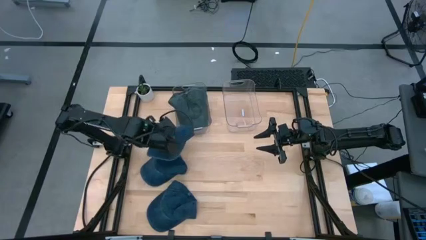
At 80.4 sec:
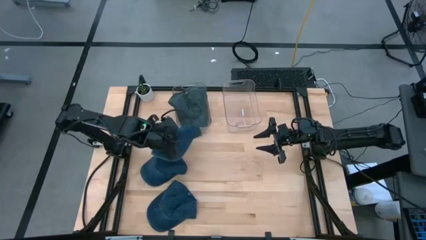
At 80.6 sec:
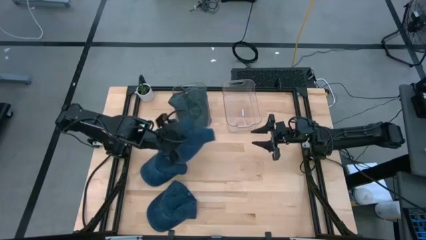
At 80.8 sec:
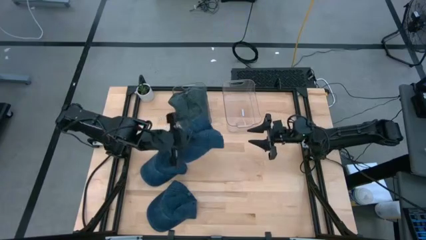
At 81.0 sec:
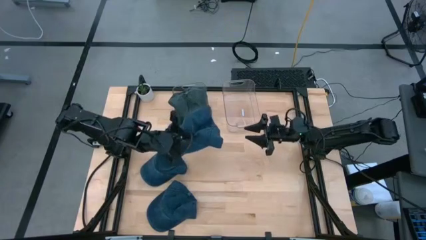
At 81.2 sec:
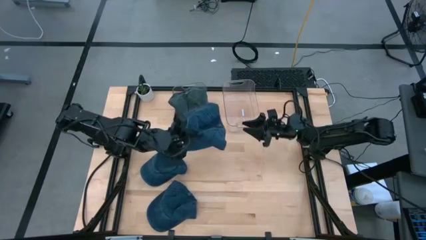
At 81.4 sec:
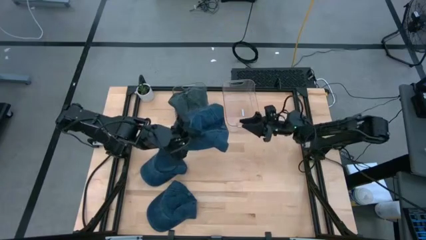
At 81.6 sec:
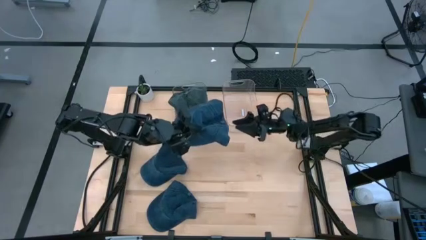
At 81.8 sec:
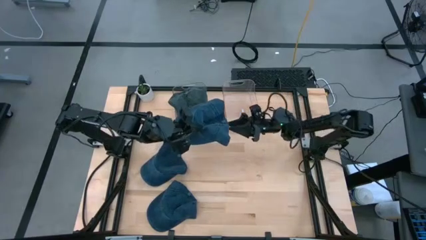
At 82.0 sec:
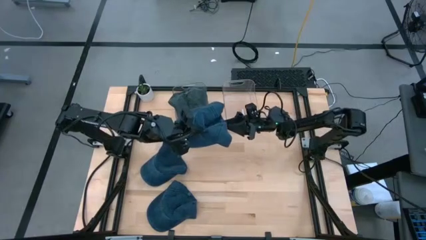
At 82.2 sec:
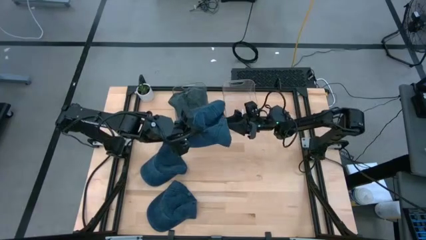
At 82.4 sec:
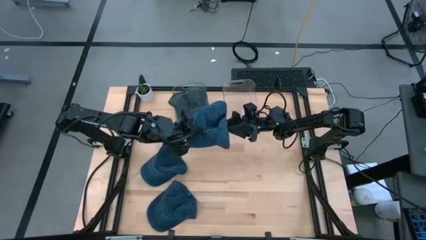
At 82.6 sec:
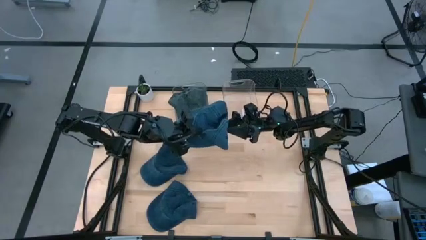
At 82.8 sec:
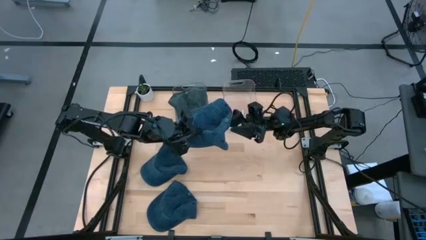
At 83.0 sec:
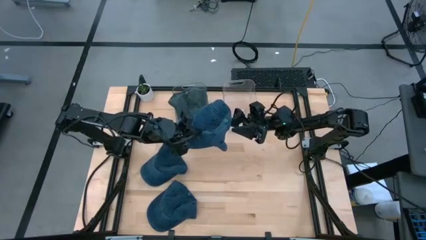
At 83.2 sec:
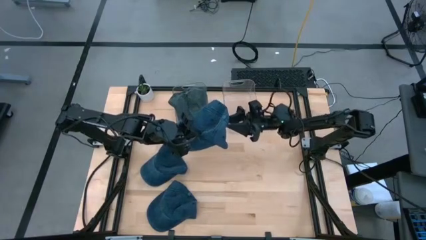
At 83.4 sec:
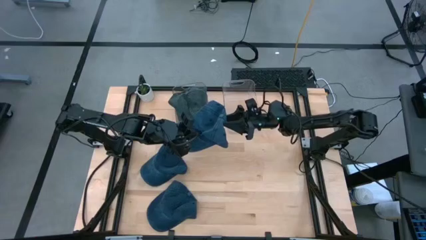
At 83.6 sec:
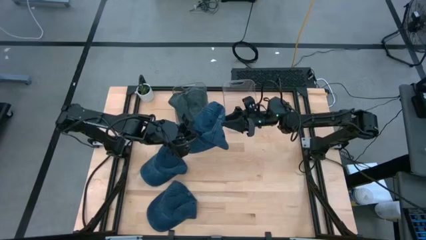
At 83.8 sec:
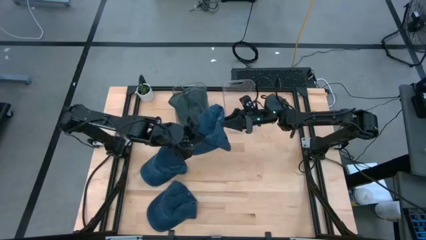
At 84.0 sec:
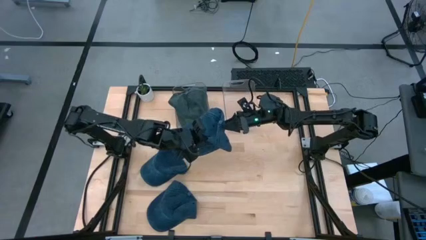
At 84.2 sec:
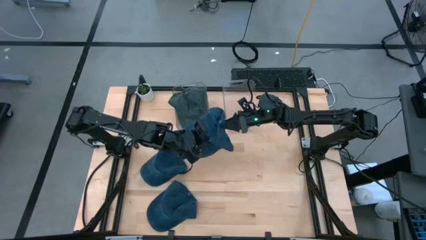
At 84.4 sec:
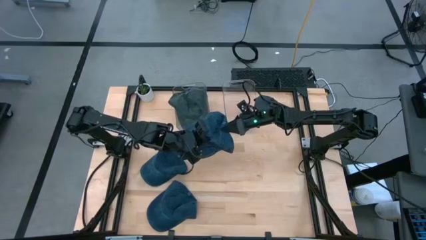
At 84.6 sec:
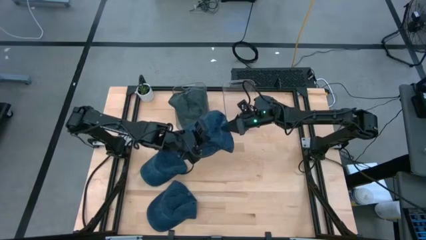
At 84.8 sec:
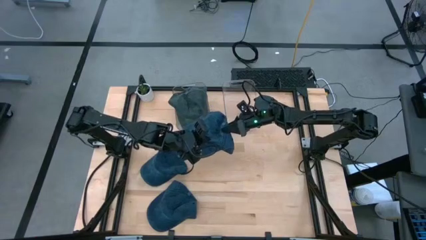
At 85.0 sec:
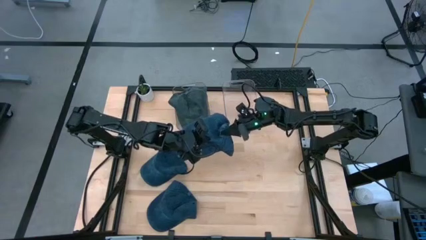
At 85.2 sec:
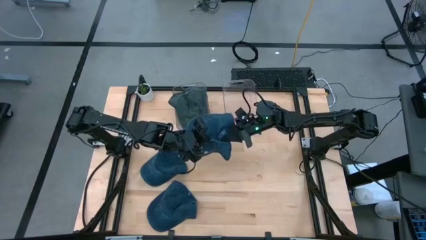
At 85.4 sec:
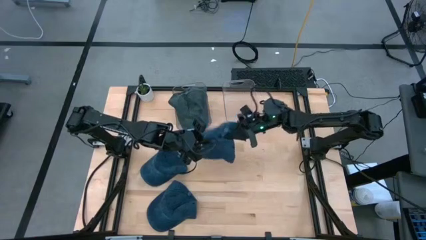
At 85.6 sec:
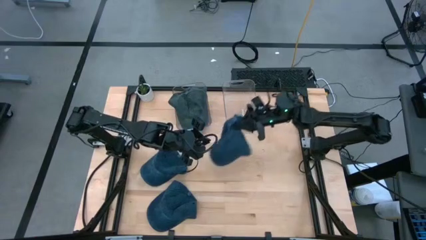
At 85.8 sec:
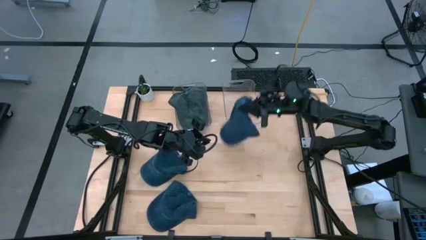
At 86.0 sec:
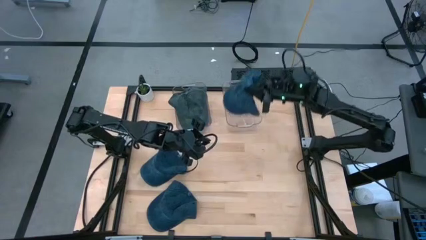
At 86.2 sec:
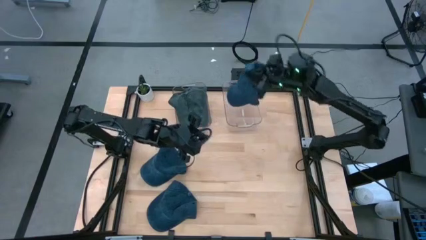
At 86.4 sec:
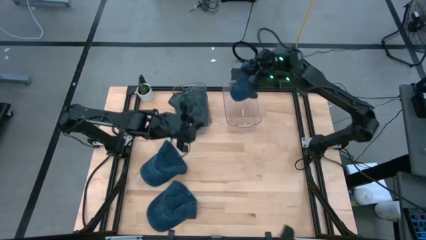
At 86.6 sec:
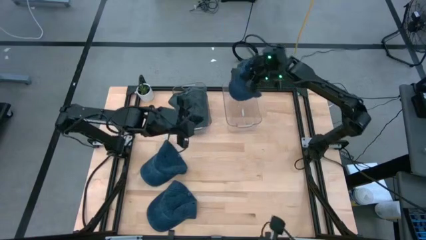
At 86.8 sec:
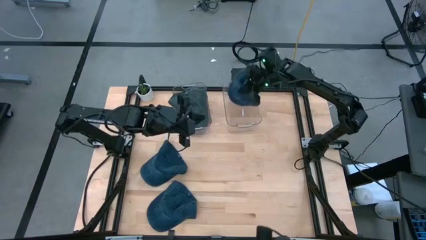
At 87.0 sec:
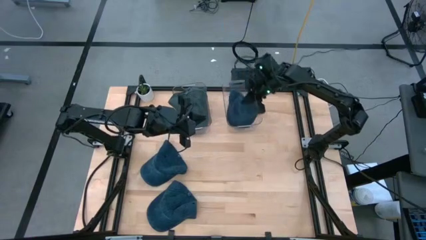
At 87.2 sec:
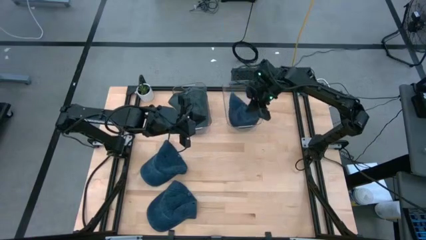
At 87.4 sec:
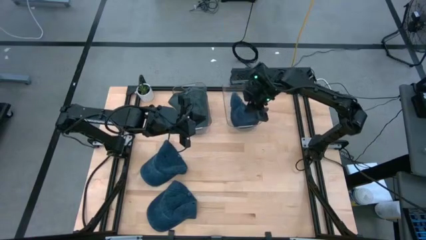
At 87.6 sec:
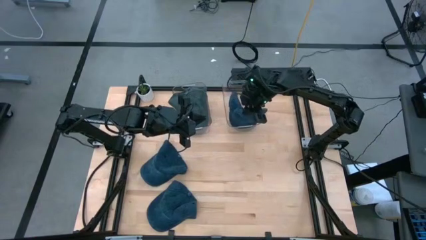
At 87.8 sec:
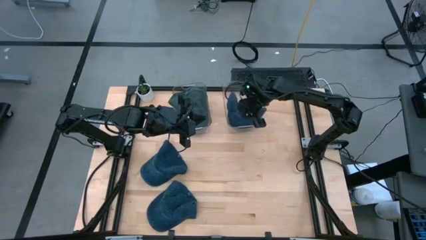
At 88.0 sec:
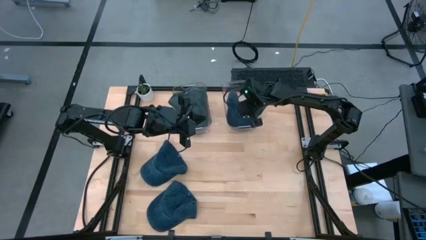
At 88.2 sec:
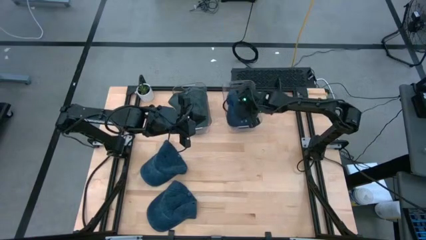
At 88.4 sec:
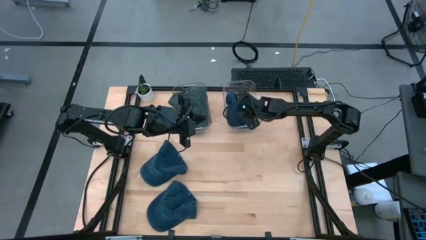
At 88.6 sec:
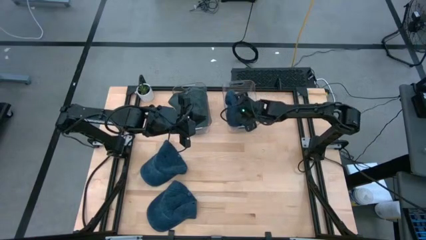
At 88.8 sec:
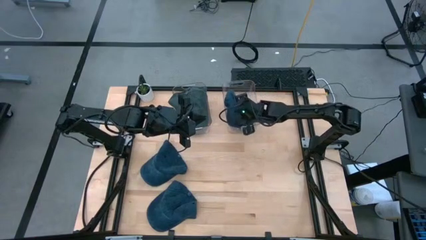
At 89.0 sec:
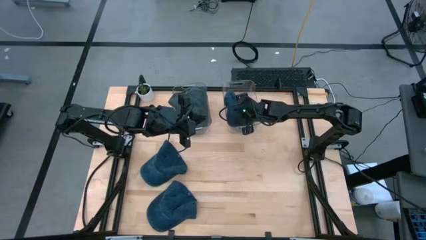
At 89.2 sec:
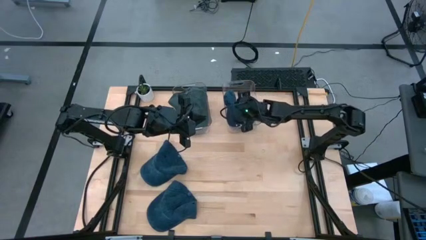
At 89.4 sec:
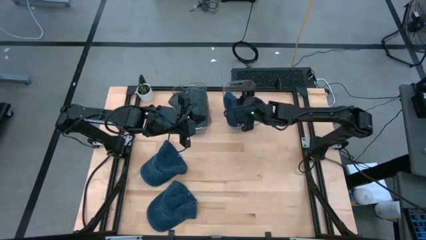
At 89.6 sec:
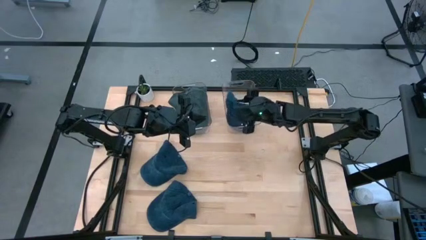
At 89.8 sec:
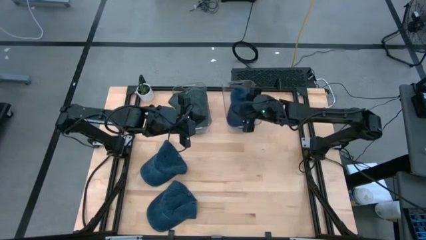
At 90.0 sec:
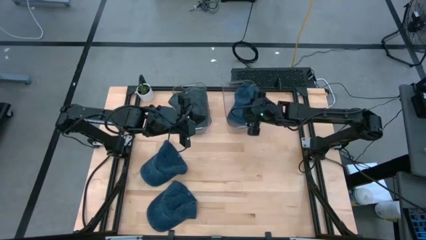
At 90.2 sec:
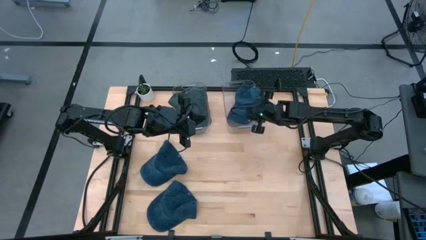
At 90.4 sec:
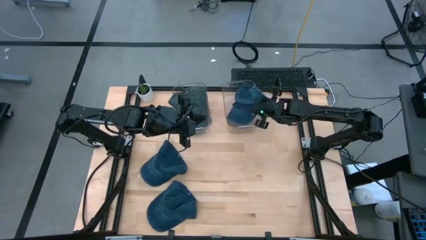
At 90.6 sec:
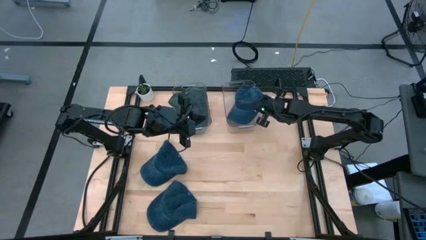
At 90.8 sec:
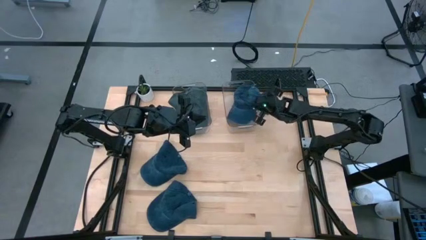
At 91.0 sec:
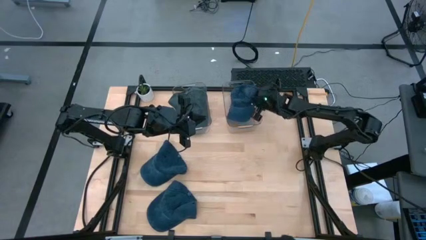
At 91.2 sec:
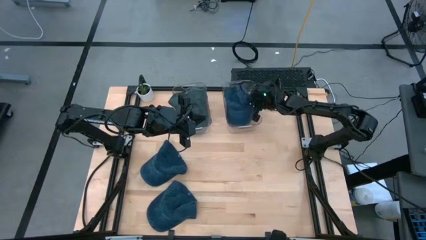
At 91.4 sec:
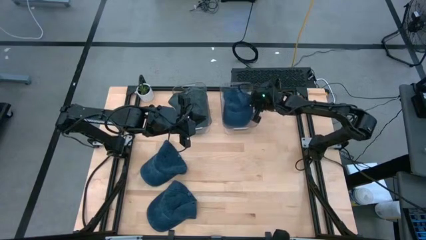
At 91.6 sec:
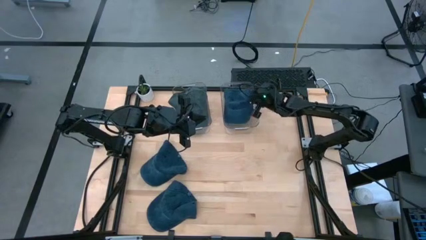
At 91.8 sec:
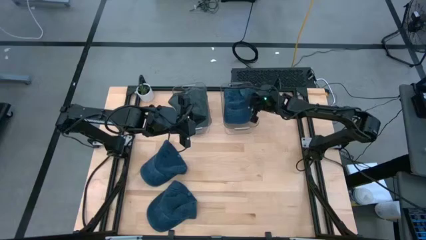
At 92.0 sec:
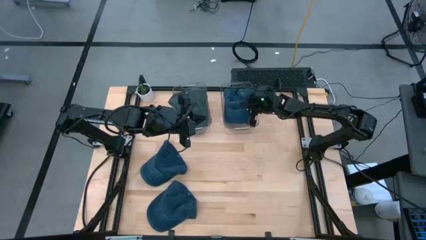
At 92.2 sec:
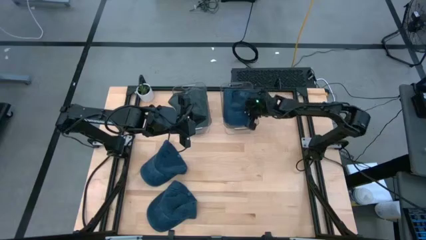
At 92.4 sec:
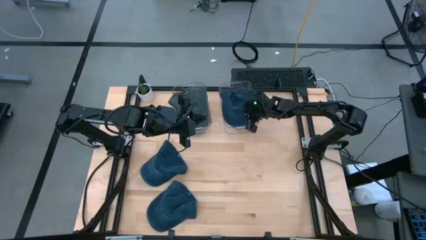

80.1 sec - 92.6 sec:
Task: Pick & Place hat
Put the top blue cap into the right transparent bin
